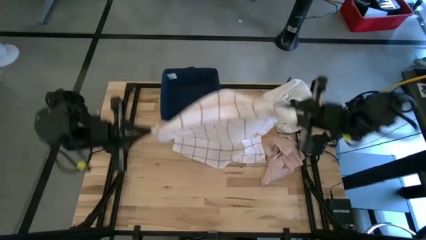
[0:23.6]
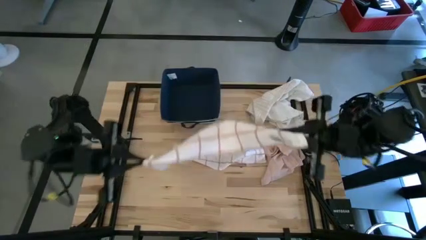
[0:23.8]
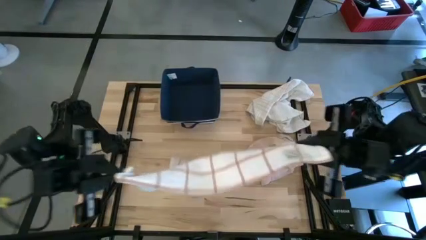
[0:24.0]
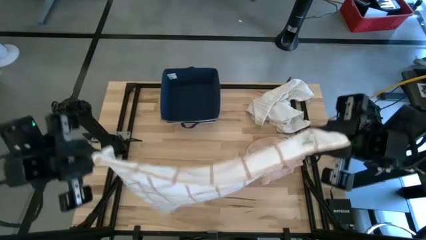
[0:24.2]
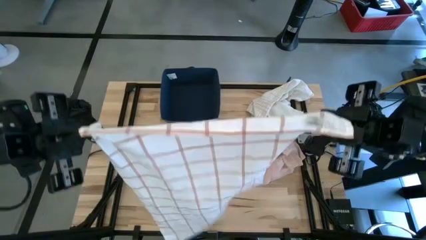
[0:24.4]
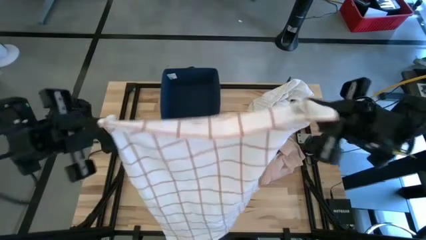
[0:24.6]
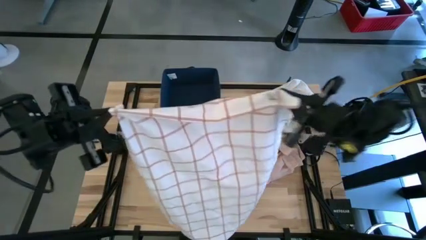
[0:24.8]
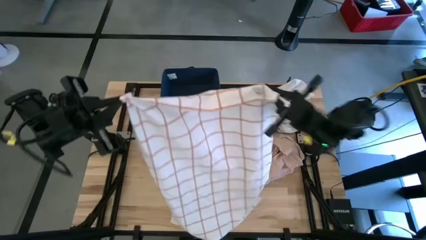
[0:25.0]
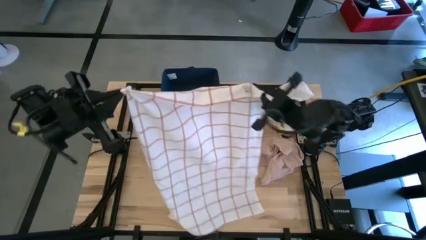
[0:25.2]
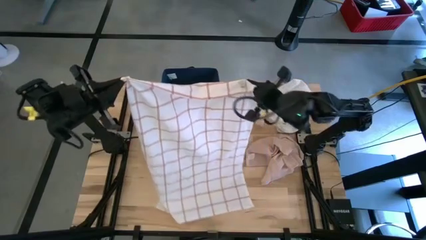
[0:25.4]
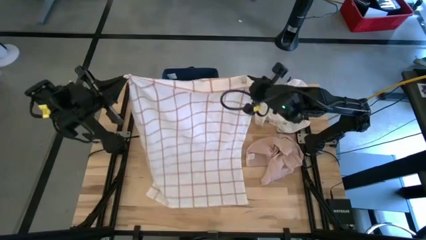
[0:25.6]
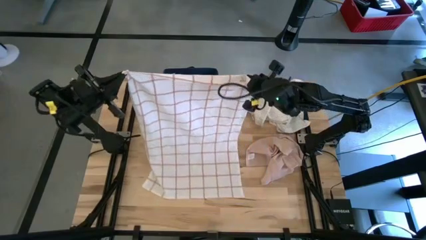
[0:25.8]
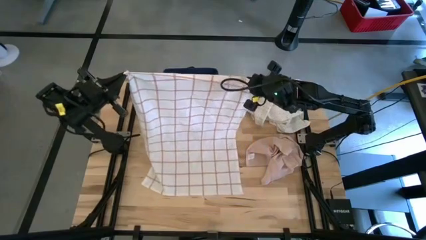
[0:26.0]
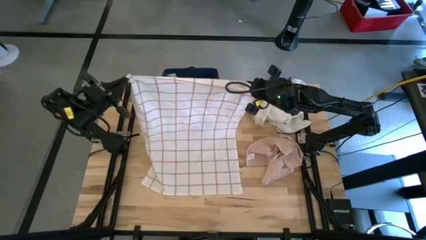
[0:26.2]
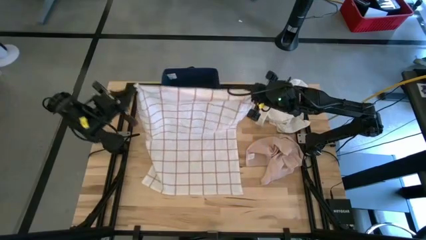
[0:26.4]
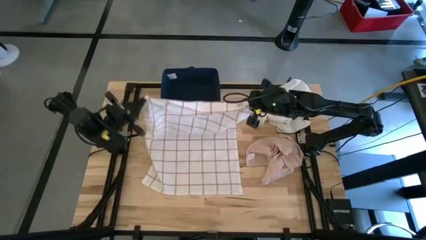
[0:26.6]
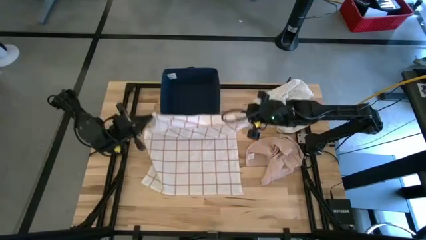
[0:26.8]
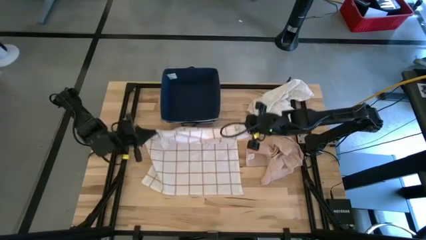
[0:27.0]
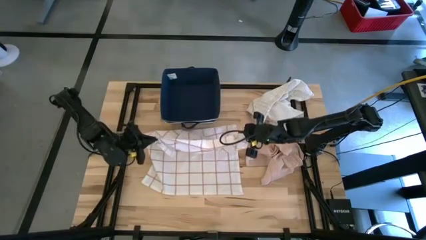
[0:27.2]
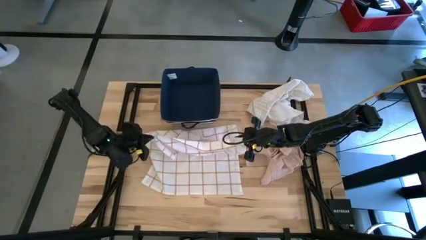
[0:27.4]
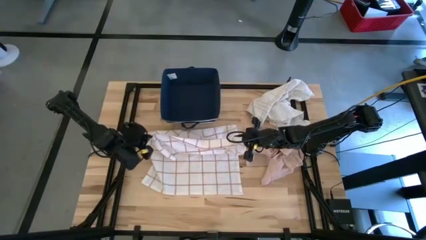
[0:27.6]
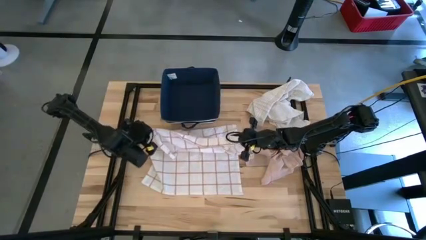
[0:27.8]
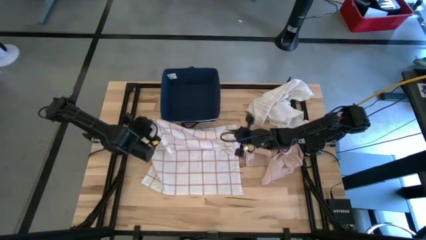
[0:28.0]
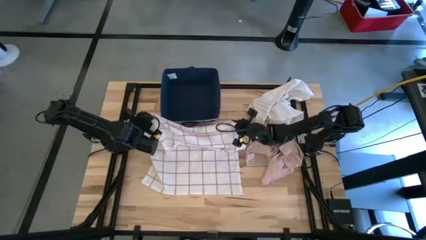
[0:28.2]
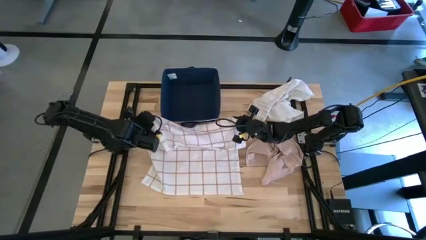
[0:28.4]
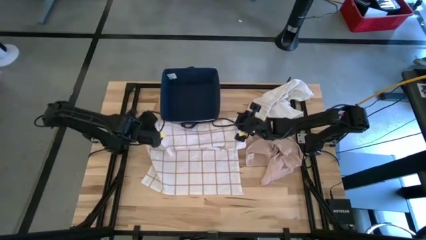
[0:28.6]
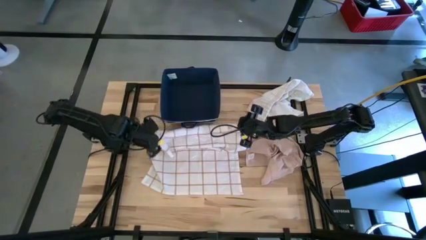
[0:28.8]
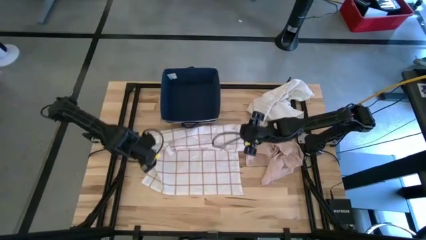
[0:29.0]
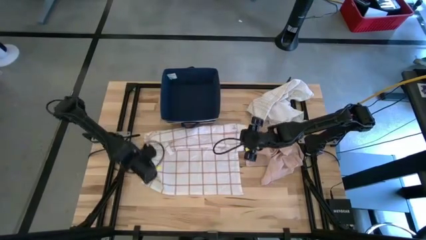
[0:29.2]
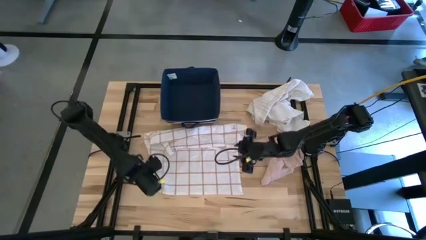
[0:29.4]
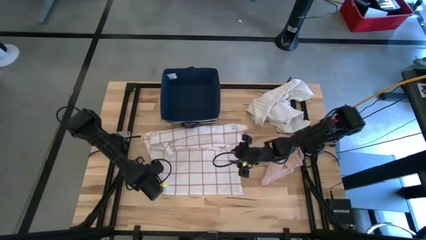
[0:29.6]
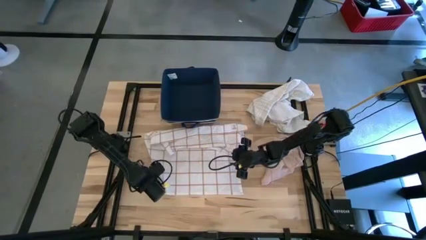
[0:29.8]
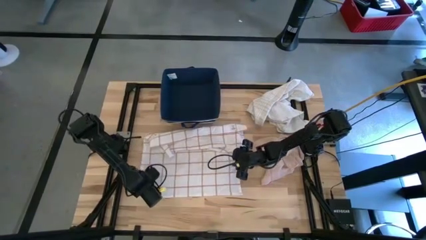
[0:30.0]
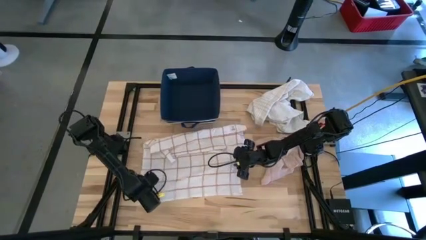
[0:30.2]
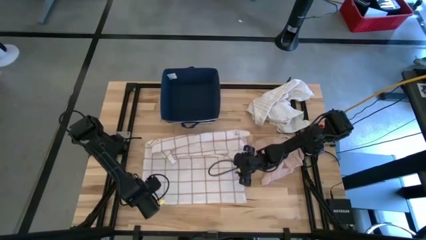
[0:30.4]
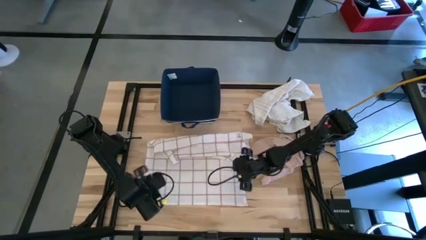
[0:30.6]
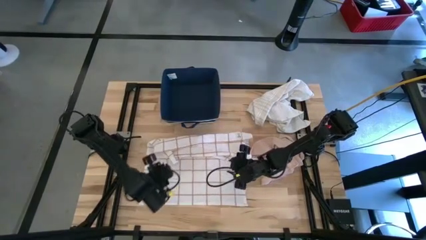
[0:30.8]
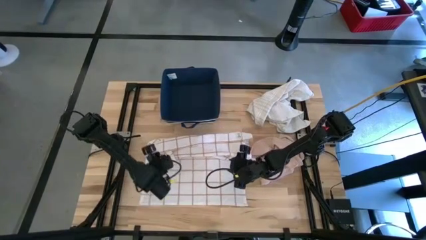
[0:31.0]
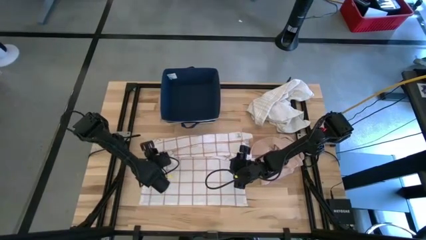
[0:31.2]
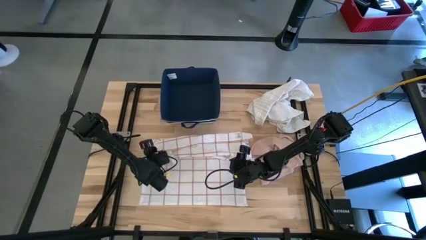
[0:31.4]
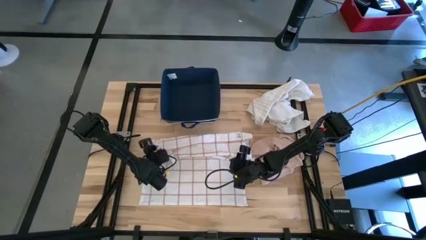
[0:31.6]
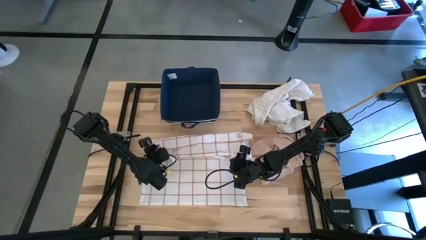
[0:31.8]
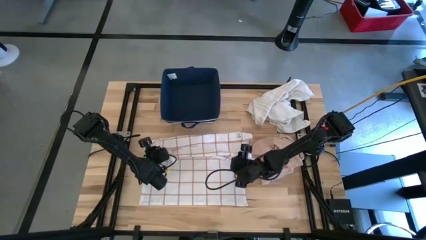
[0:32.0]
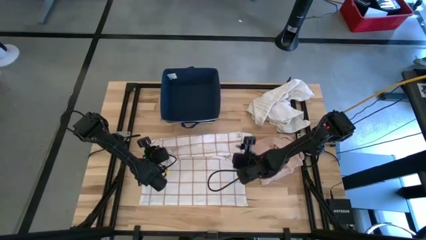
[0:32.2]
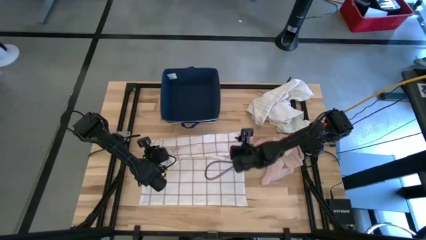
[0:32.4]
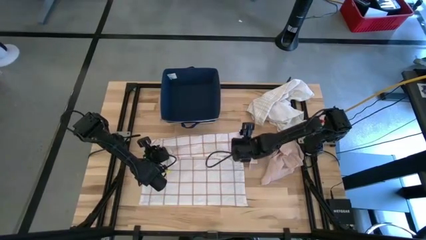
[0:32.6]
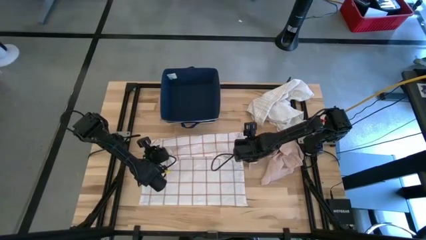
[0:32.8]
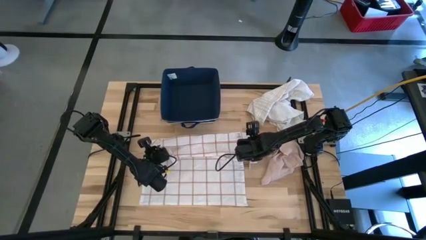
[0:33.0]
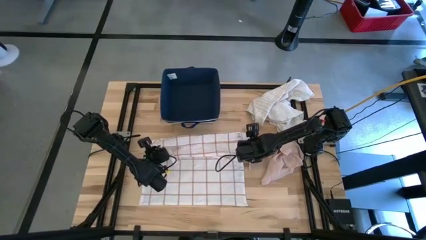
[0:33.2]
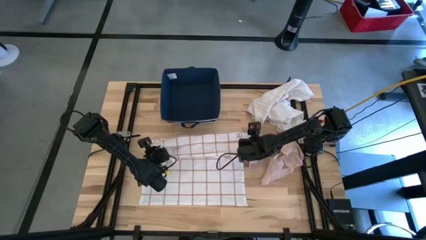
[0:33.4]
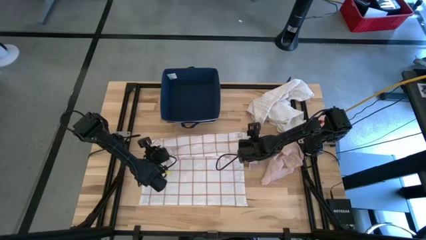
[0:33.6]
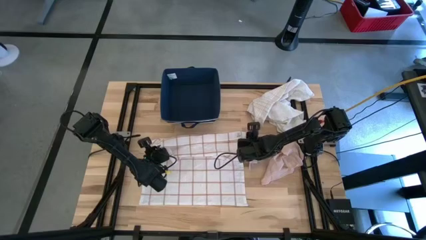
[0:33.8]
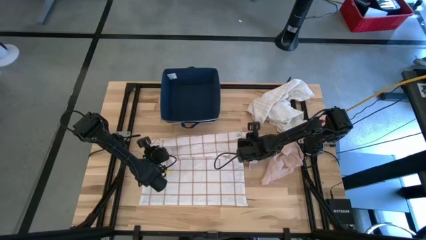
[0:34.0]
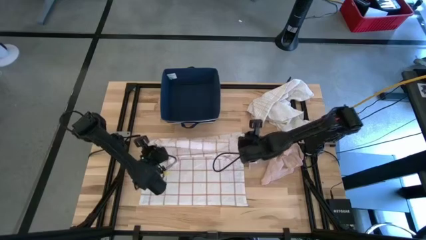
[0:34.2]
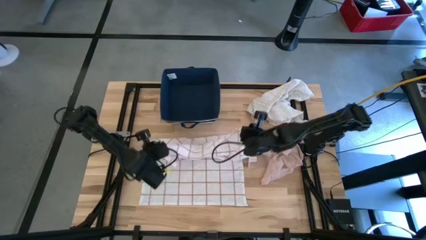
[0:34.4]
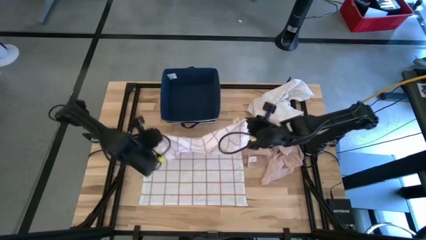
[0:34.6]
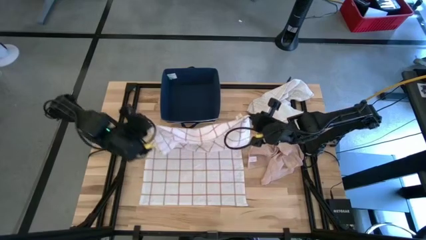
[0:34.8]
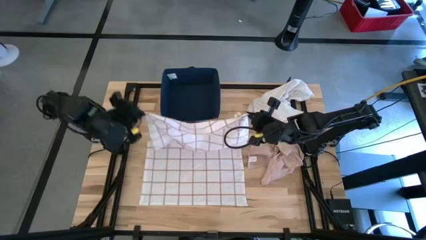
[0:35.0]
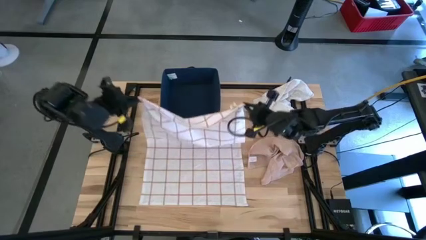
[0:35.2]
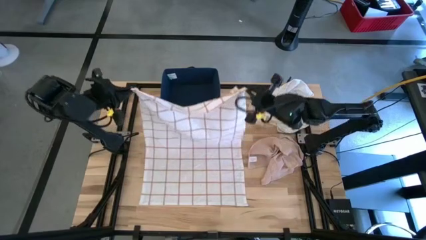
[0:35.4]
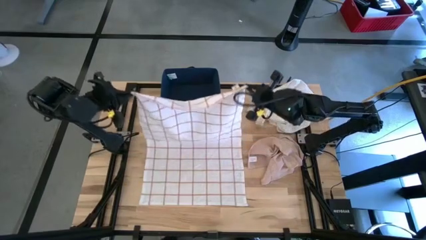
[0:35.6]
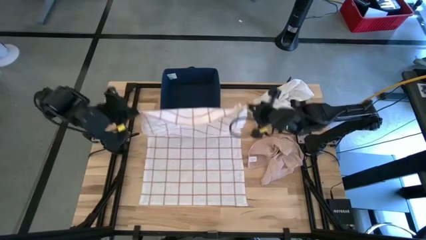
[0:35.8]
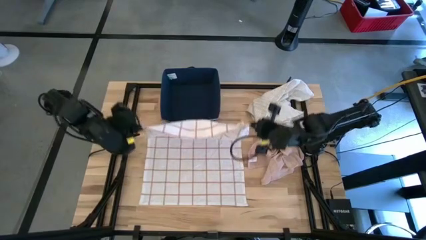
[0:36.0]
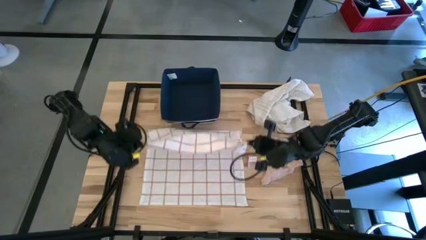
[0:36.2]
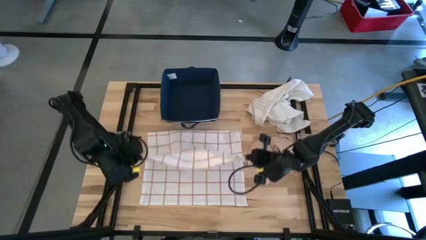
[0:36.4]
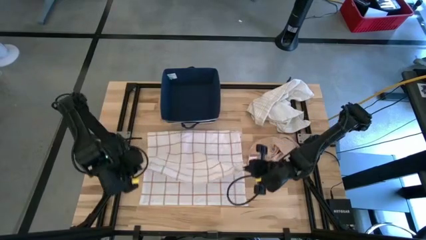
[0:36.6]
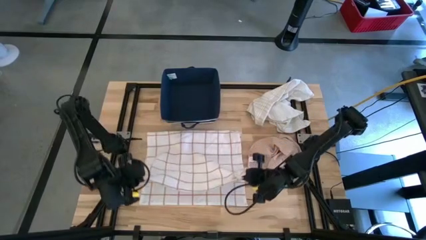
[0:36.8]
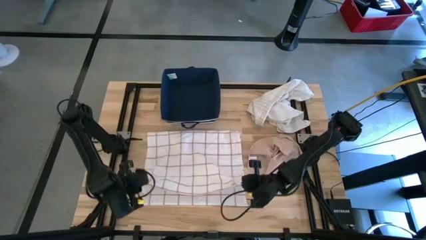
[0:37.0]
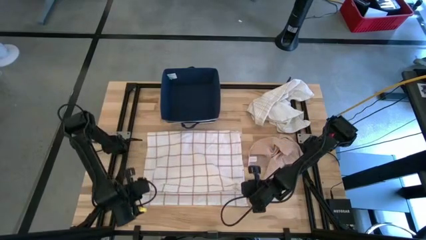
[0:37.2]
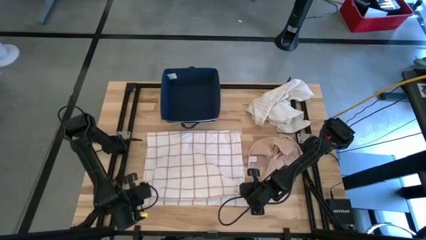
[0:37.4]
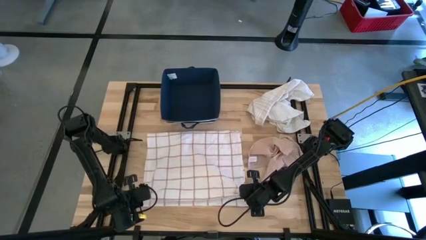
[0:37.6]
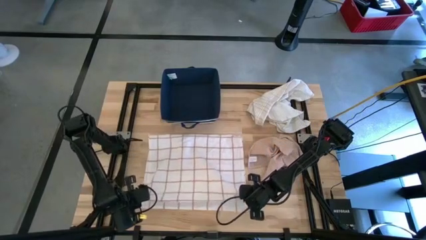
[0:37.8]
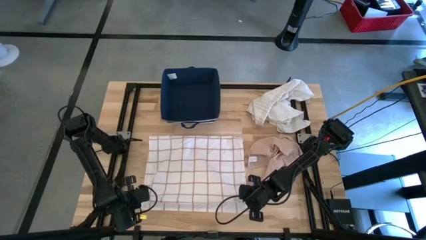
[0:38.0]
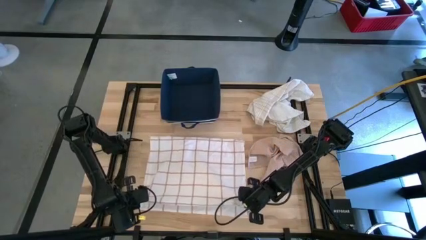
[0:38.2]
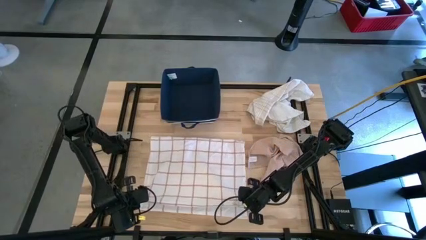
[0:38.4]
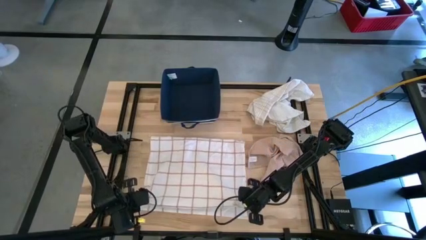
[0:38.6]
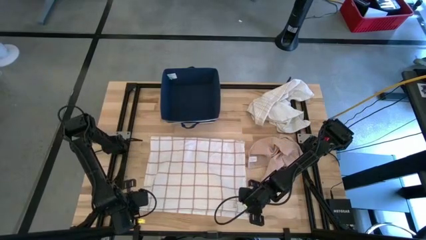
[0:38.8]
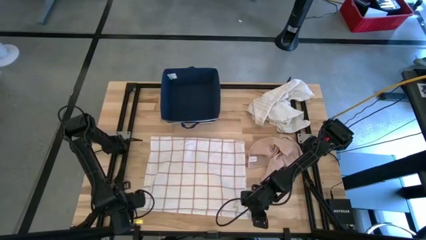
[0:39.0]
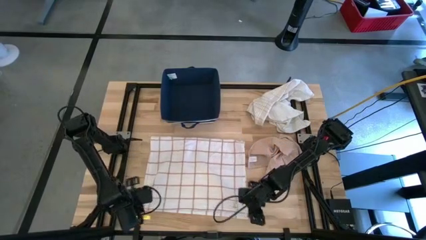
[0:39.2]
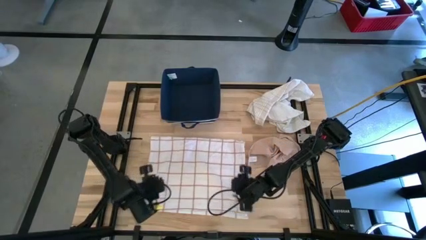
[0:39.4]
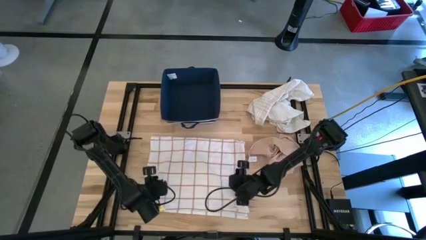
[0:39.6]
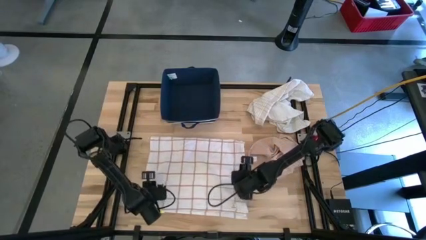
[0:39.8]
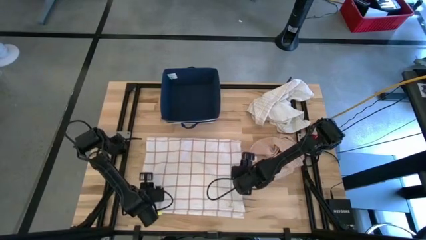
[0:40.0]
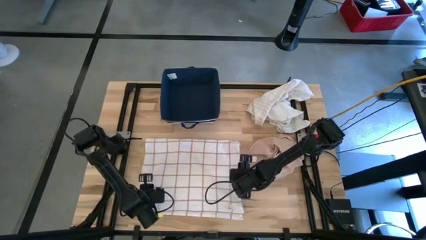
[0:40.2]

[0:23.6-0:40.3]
Task: Fold towel
Fold the left white patterned towel
